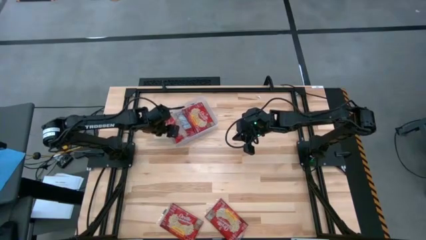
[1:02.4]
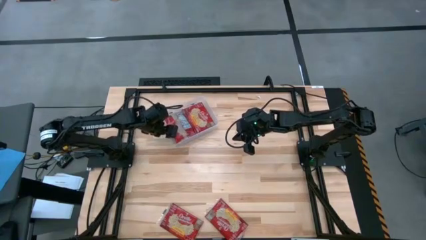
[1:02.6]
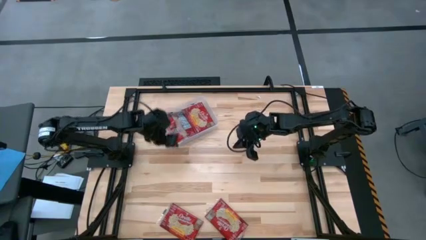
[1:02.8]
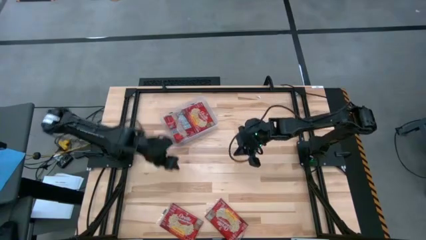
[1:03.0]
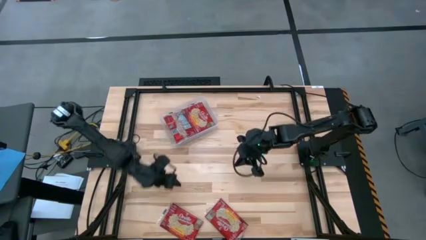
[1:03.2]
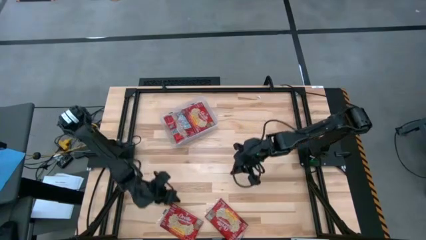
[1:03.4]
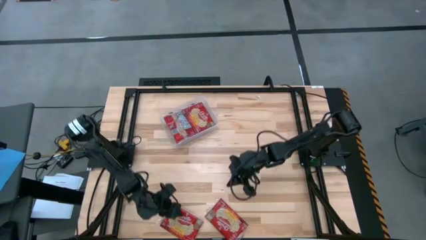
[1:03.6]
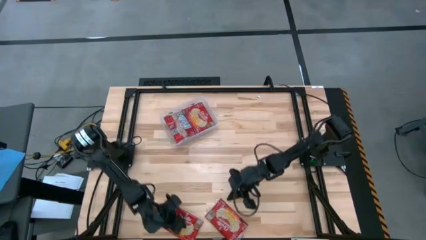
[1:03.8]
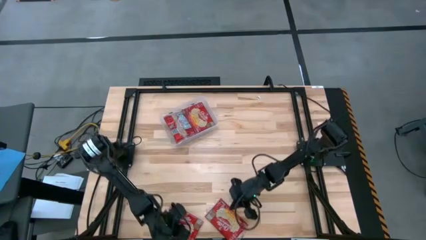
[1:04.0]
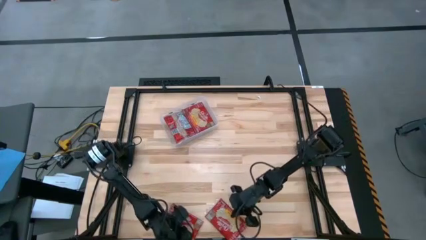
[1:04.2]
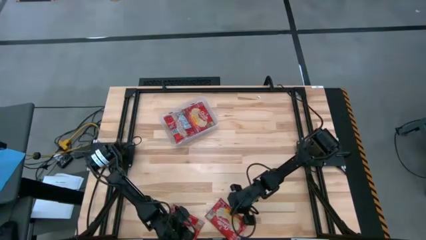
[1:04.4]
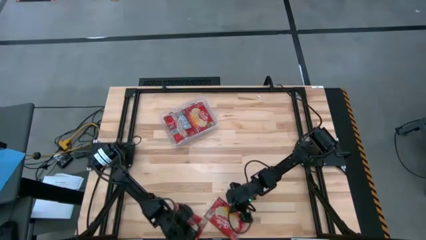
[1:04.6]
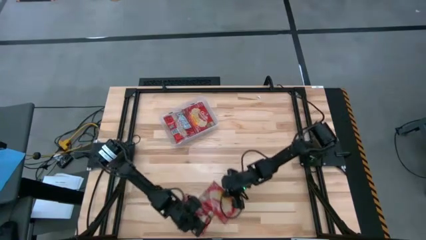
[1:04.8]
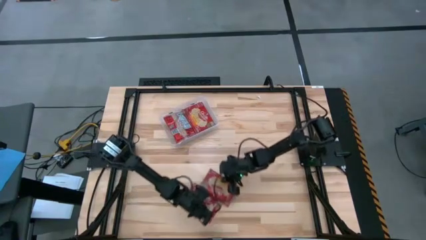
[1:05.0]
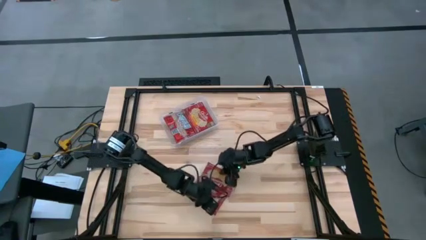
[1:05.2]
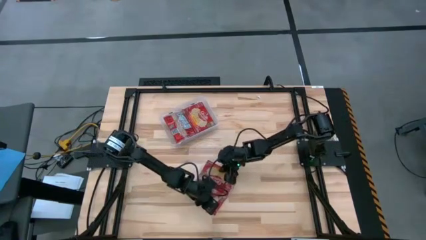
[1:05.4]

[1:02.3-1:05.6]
Task: Sort popcorn bags into baskets
Move the red popcorn bags to the center of the table

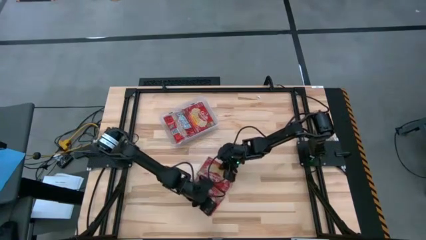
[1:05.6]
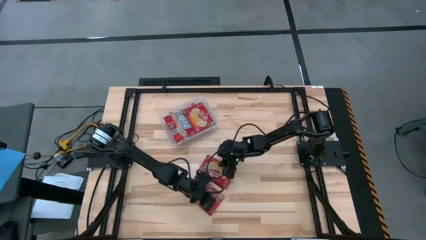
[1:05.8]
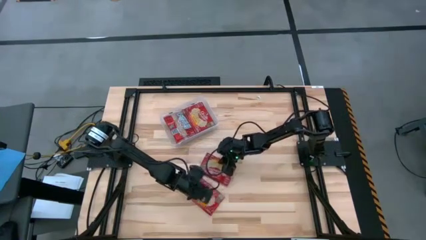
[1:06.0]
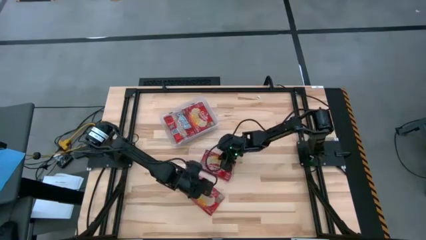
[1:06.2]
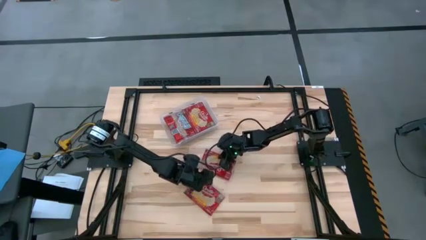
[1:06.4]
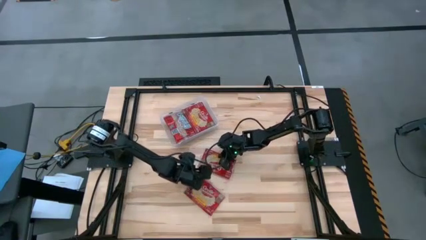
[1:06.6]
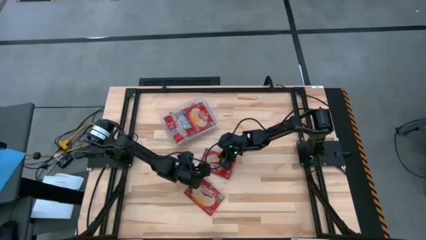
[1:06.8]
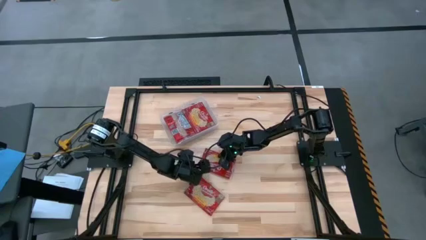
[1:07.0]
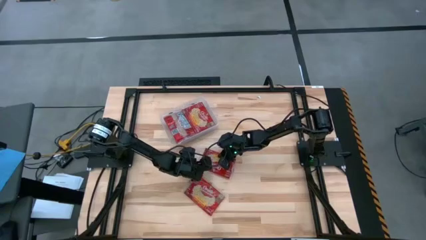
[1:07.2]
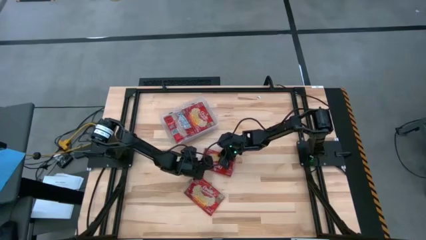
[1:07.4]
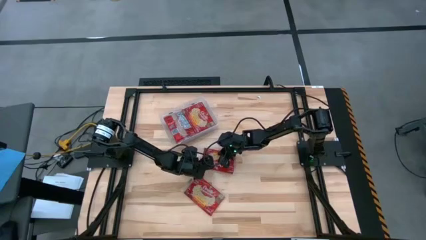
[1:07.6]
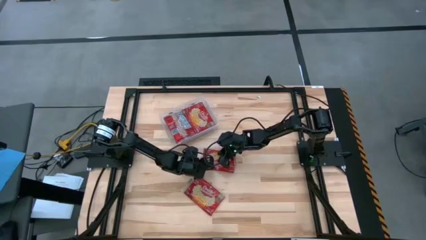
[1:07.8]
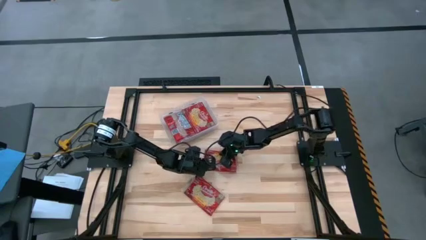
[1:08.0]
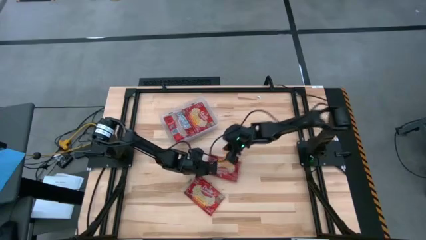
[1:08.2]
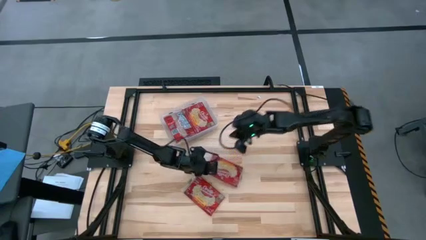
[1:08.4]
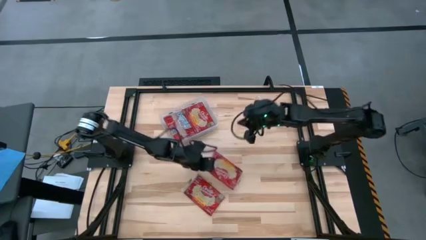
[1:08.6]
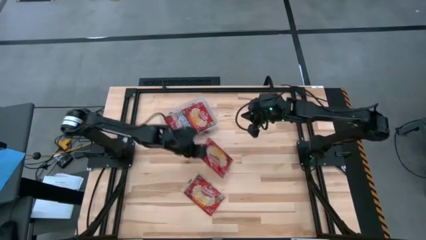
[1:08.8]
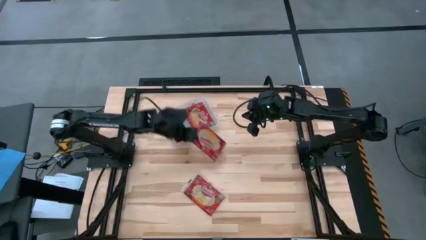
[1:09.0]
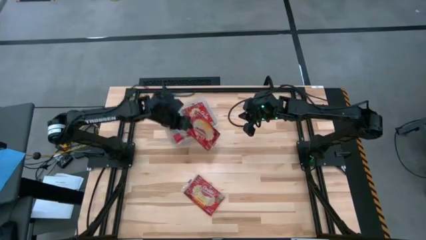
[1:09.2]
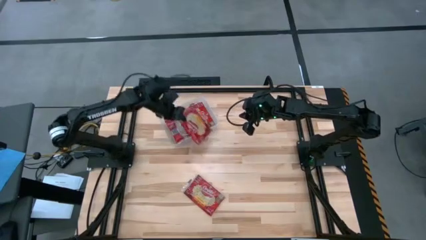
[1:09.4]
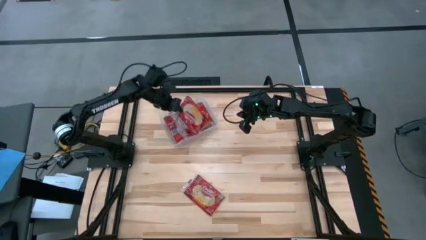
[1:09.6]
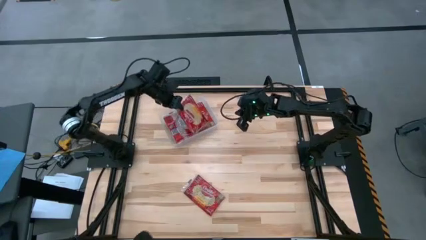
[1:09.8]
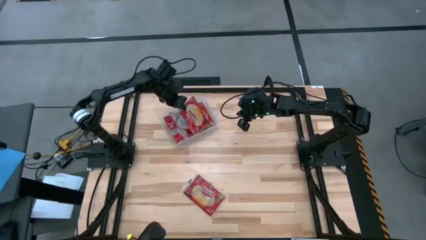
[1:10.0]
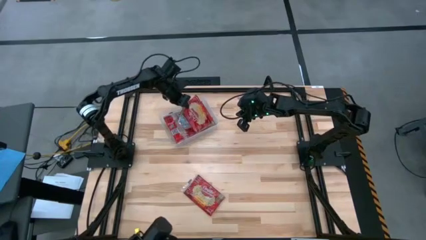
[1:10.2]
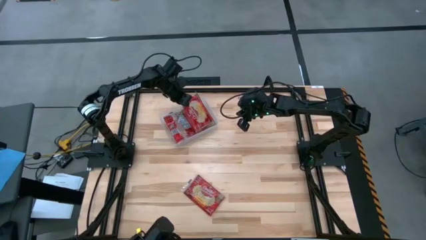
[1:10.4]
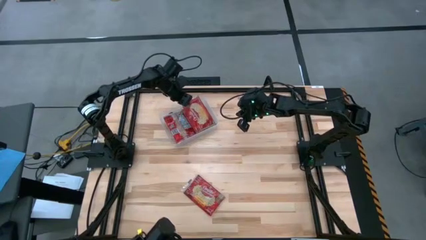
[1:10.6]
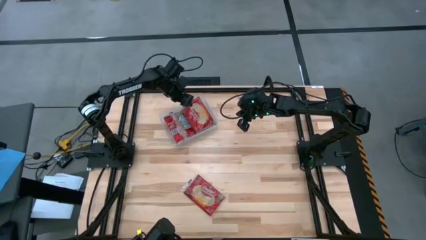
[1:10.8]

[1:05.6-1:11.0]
Put the top red popcorn bag into the transparent bin

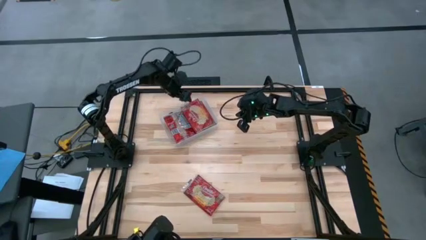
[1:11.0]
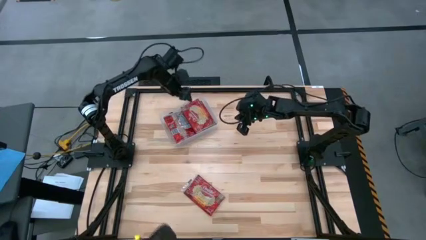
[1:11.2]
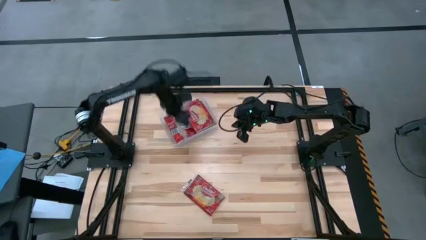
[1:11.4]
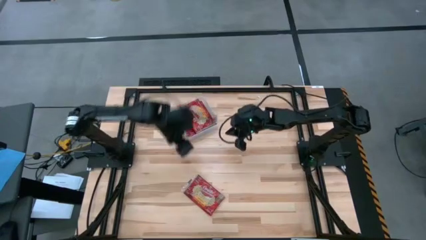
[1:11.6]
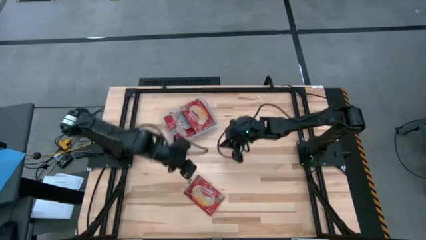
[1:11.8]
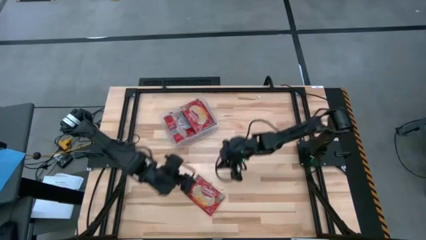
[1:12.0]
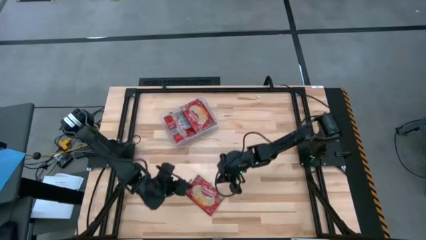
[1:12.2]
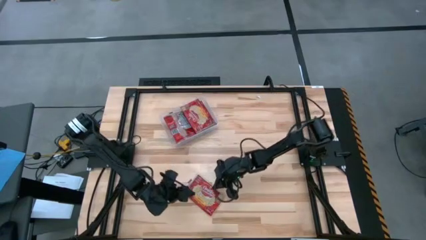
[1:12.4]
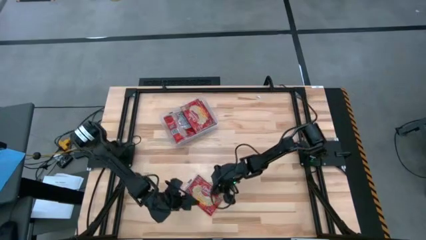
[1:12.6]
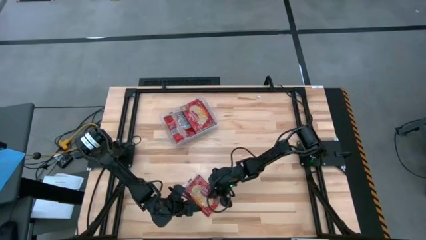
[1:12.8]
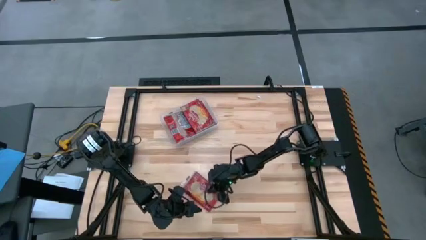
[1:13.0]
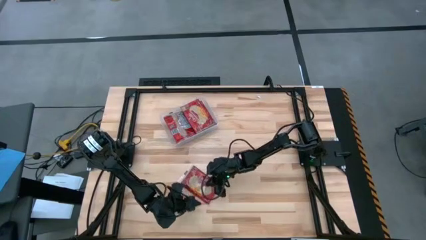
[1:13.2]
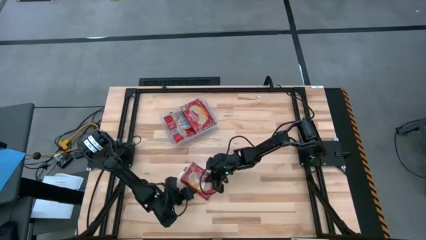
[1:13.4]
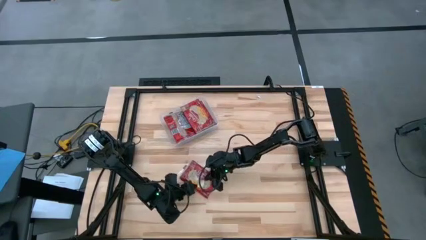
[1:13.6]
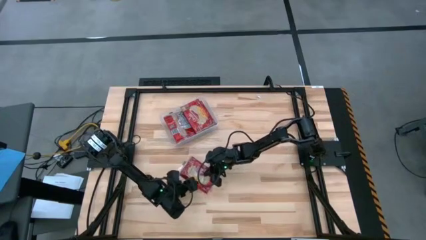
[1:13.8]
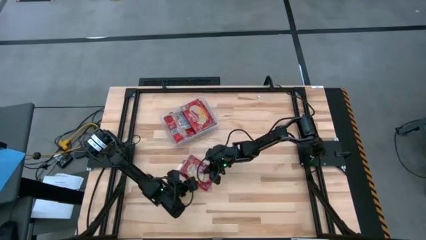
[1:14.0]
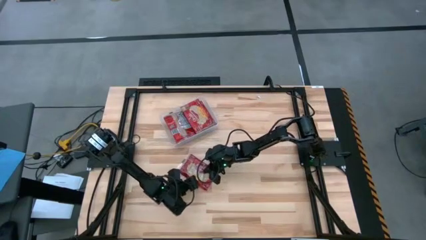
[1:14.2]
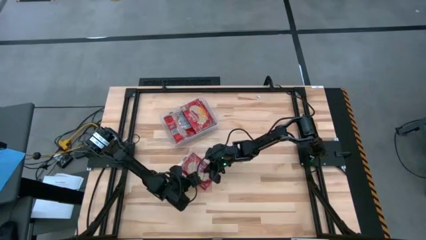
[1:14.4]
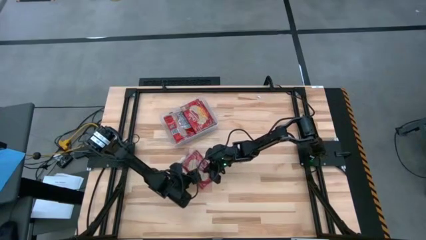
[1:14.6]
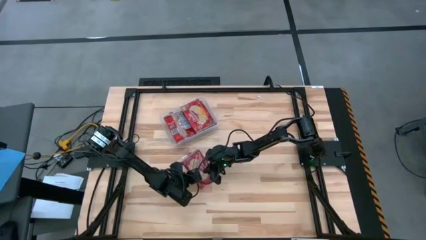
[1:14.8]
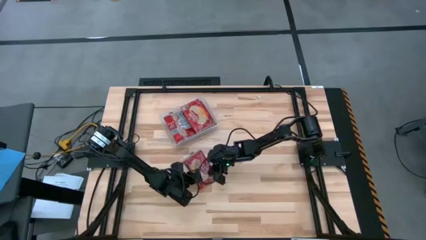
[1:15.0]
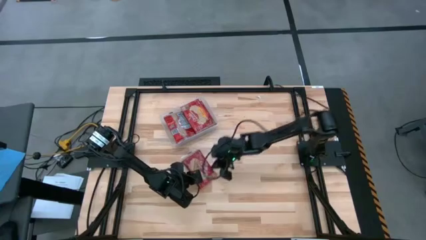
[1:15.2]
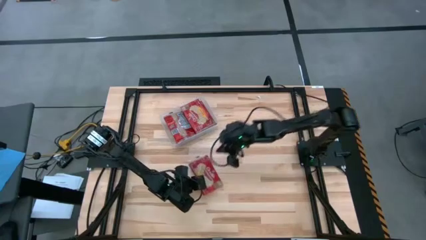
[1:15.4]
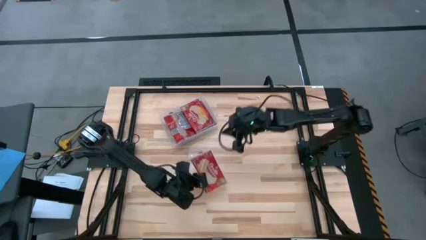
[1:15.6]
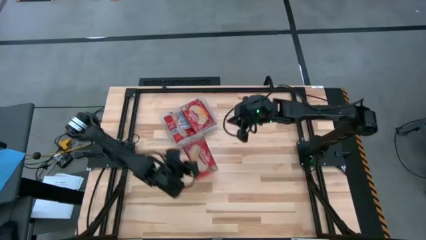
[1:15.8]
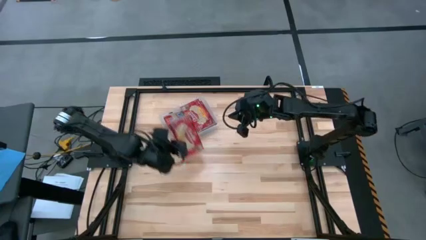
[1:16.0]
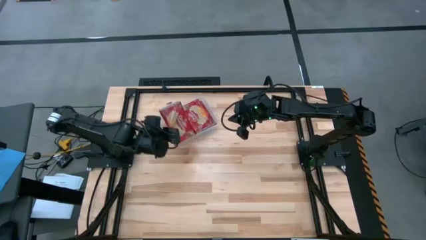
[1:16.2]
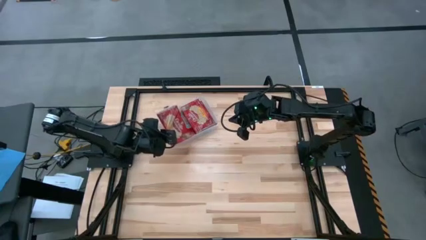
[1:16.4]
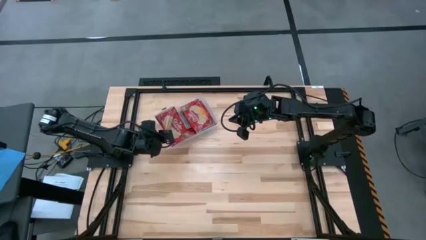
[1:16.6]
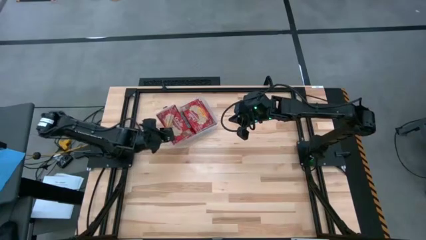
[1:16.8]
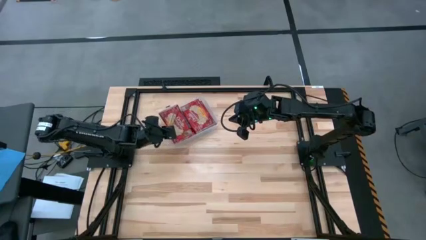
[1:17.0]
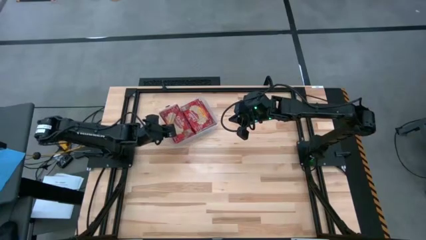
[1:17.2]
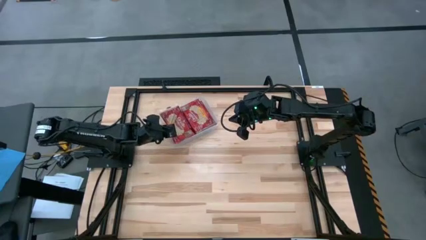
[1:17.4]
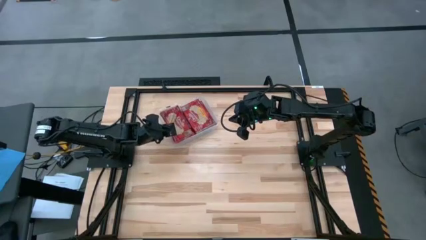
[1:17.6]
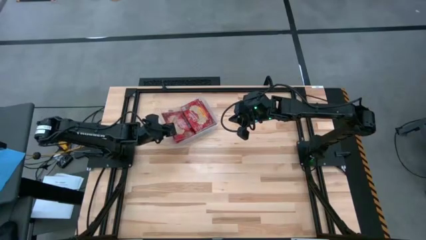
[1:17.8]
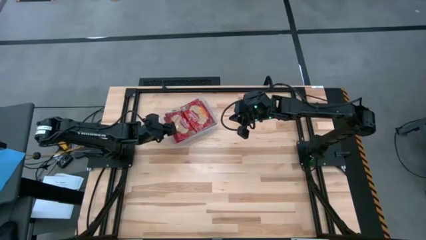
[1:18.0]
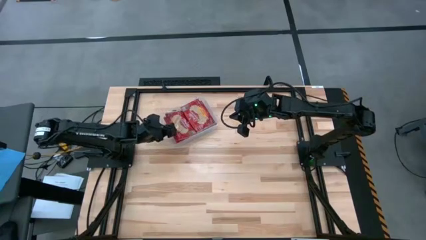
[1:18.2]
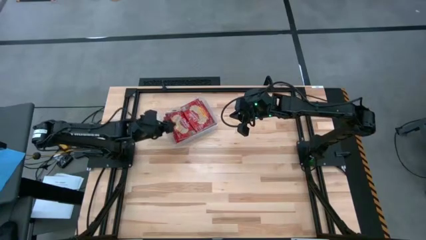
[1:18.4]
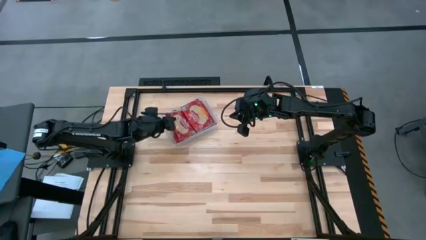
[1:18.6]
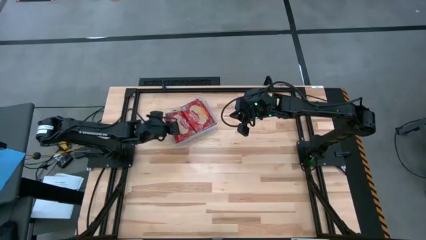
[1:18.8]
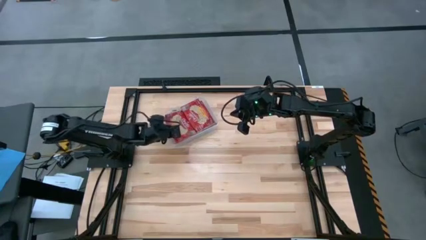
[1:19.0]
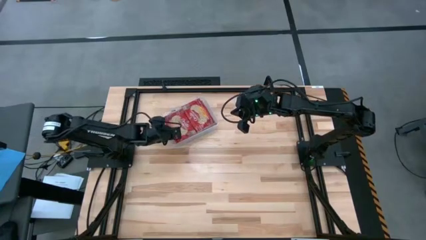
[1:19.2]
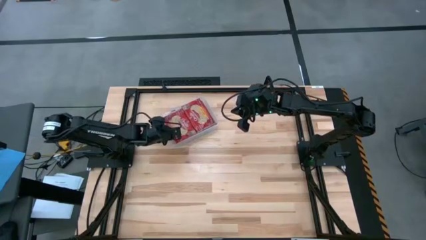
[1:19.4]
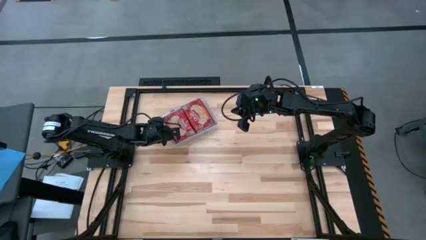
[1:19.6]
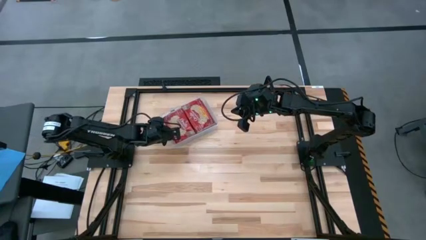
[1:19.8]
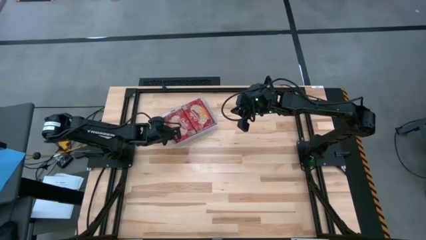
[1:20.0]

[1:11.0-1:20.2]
Put the red popcorn bag into the transparent bin
